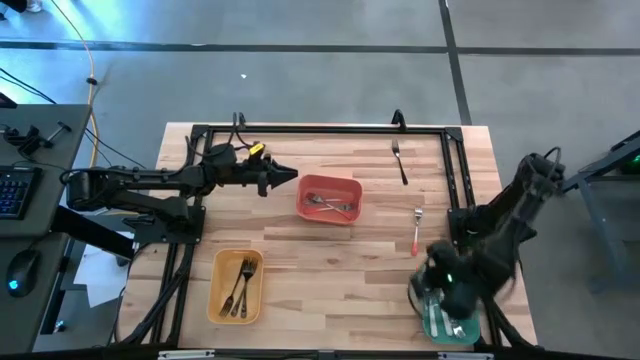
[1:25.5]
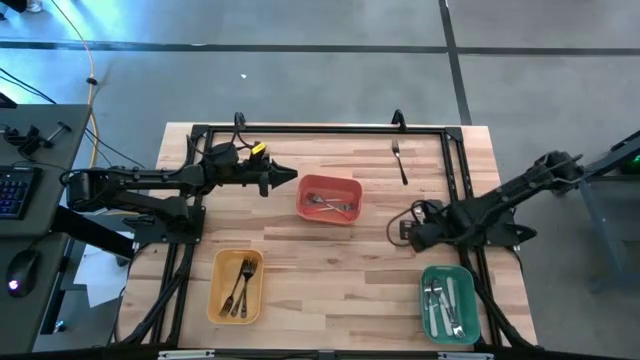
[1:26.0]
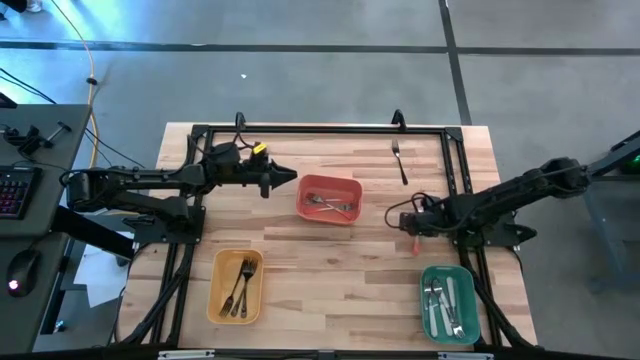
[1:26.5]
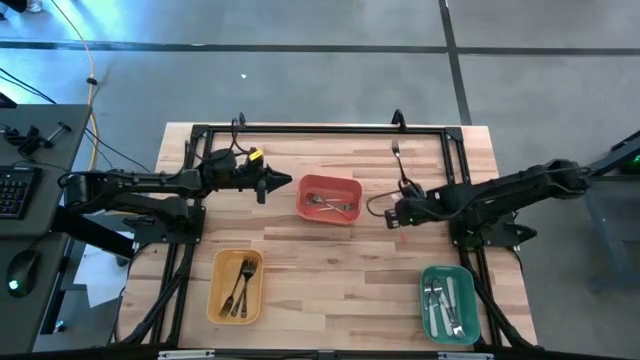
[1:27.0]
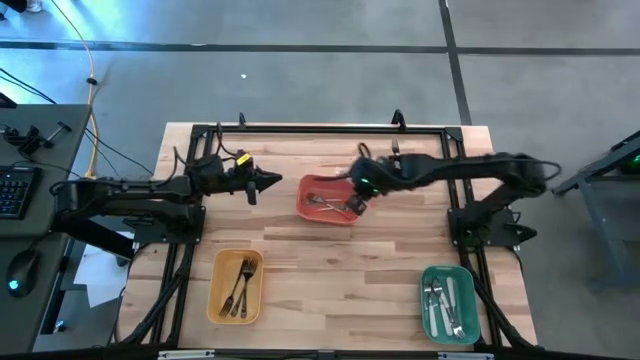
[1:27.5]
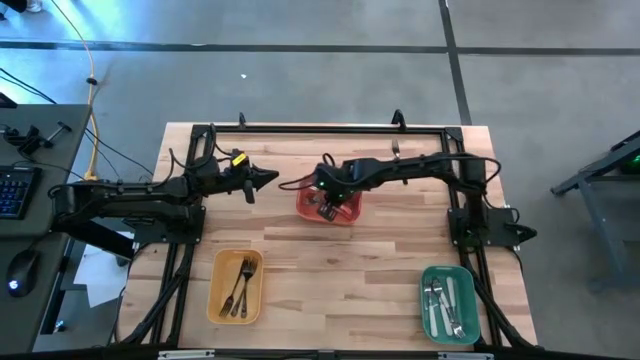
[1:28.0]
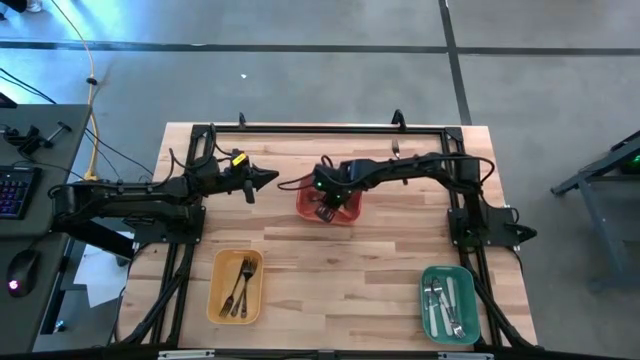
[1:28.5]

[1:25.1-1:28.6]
Task: Sort silverware by color (type)
Put the orange fork into the orange bin

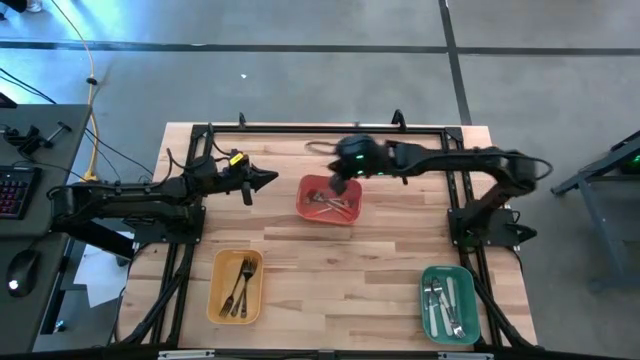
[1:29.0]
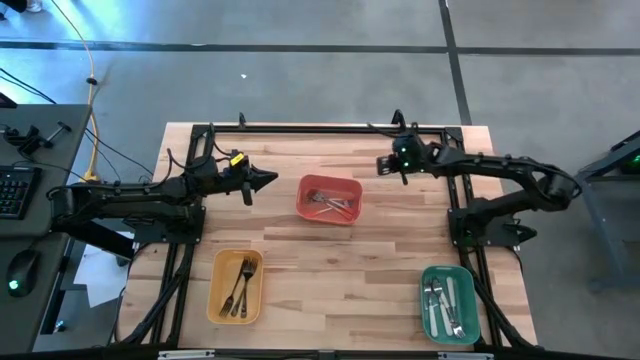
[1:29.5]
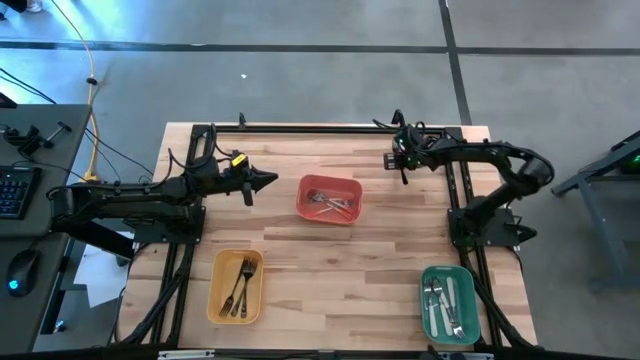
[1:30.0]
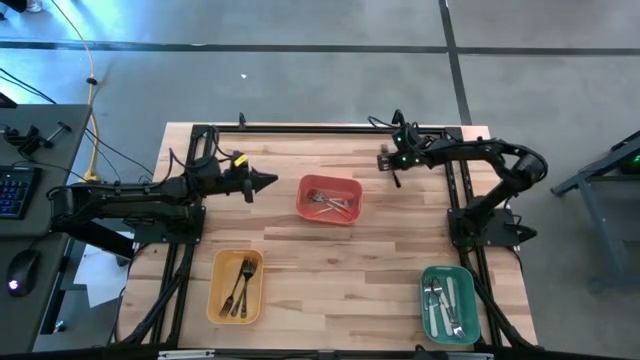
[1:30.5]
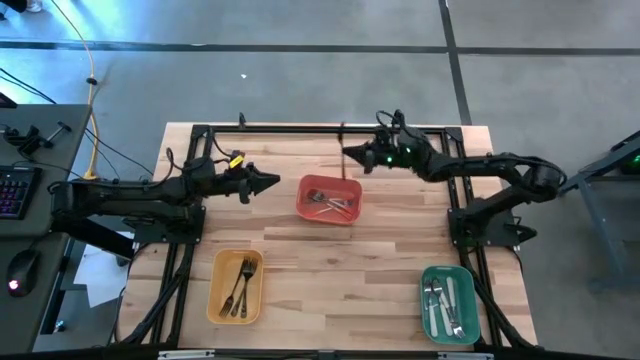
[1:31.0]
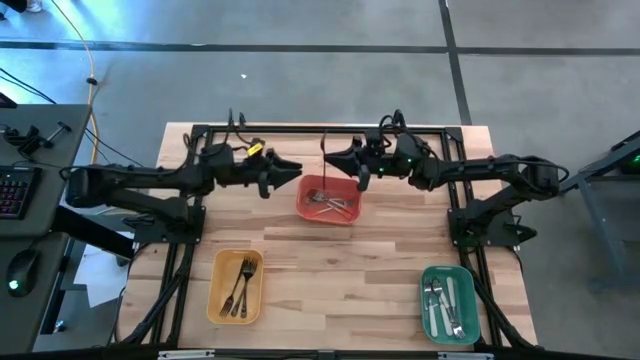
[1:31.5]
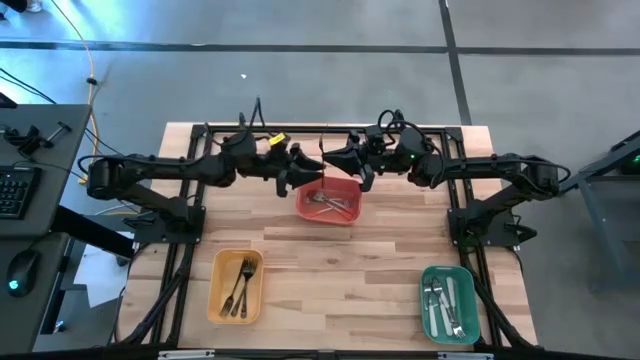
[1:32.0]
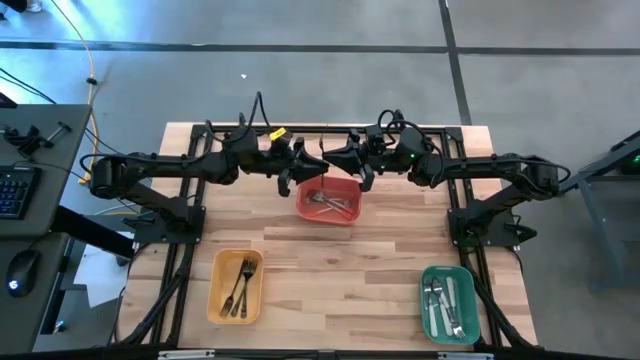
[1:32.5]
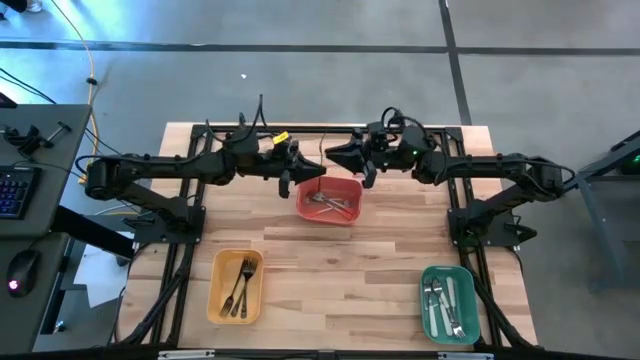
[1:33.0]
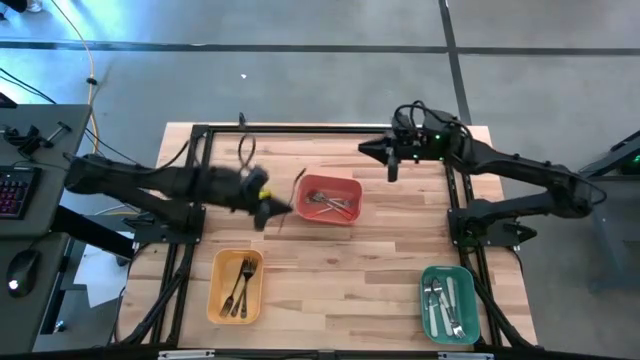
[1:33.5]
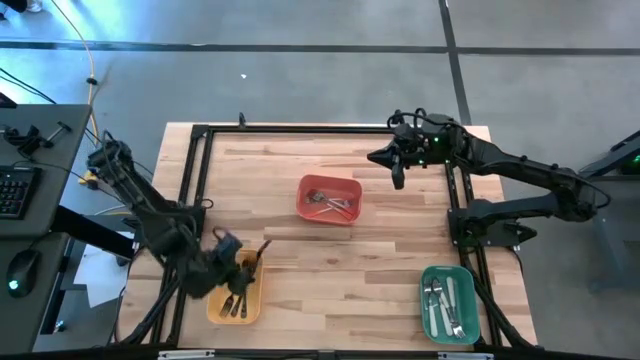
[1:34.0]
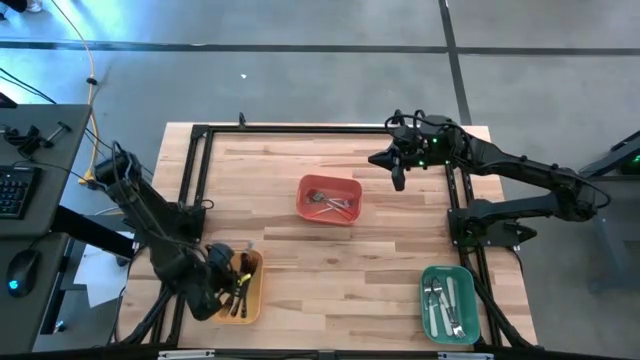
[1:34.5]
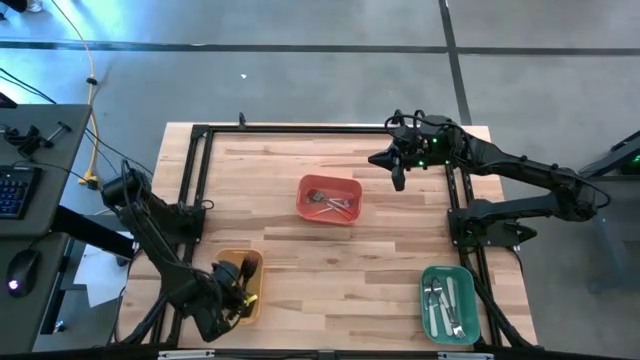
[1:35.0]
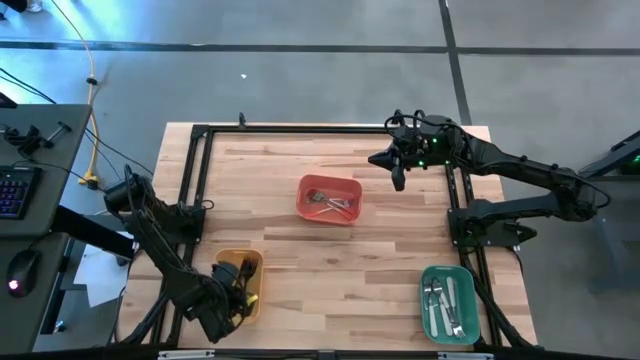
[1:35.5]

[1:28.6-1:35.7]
Put the black fork into the yellow bin

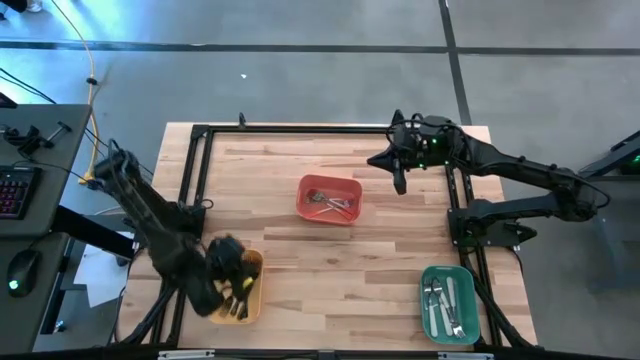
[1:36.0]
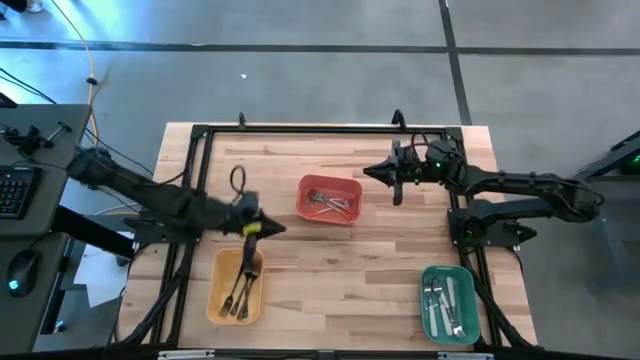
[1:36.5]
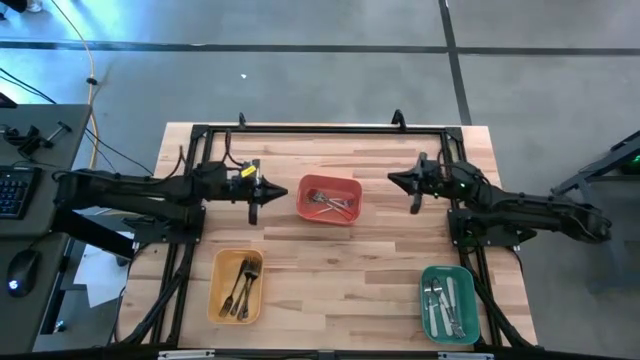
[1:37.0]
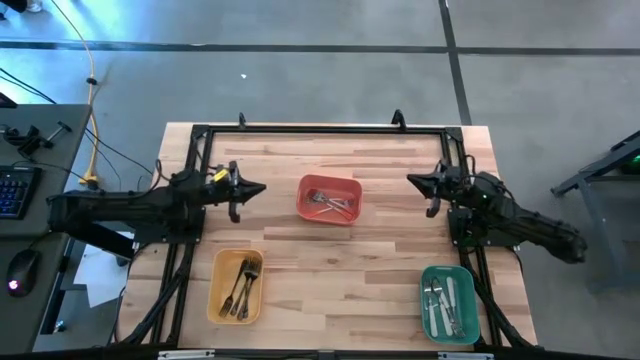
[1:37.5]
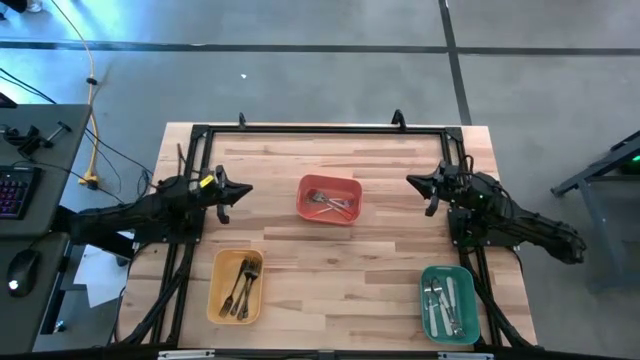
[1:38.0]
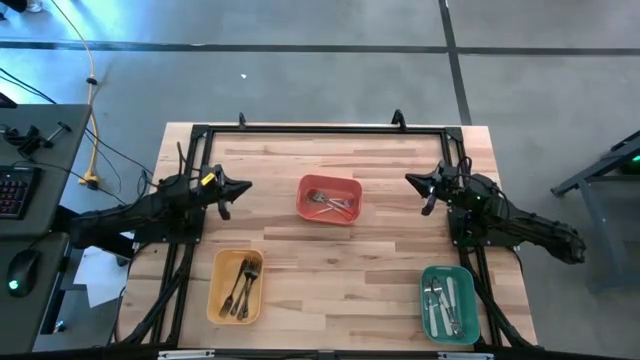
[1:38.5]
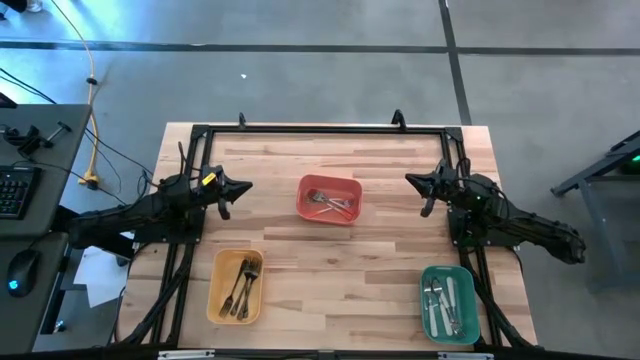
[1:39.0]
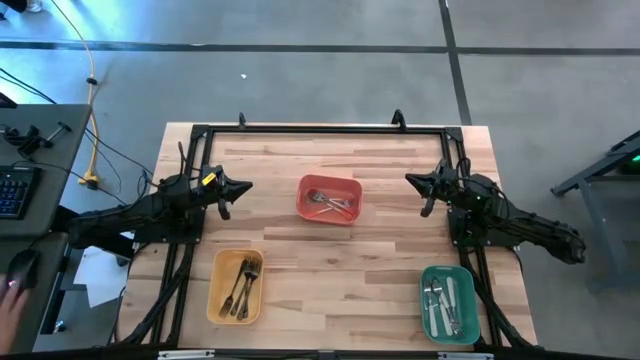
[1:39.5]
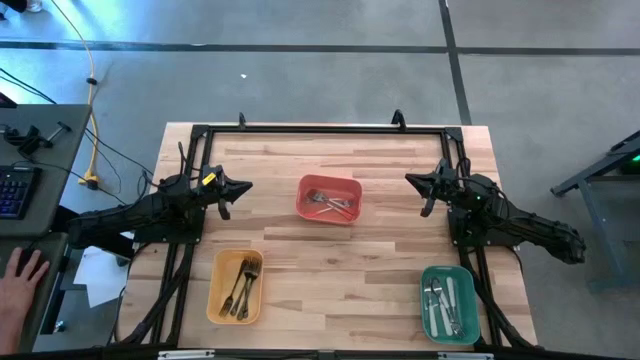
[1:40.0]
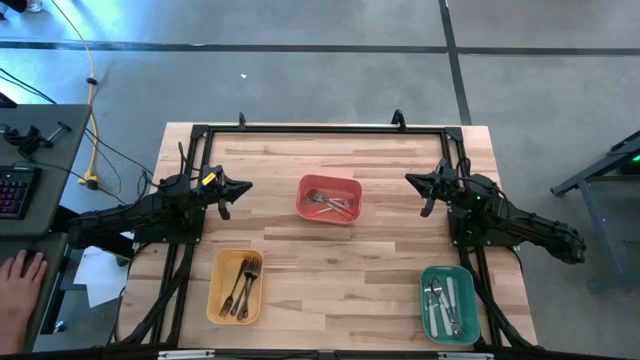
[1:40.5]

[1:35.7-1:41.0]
Return to Home Position

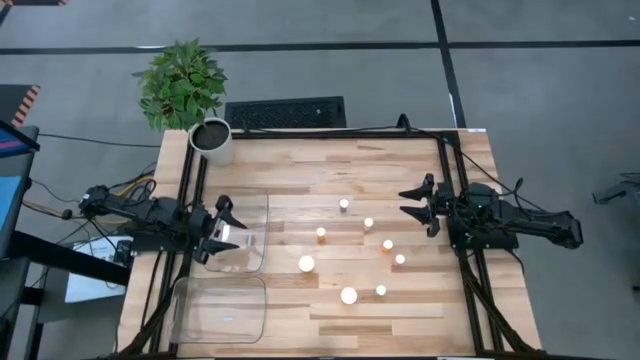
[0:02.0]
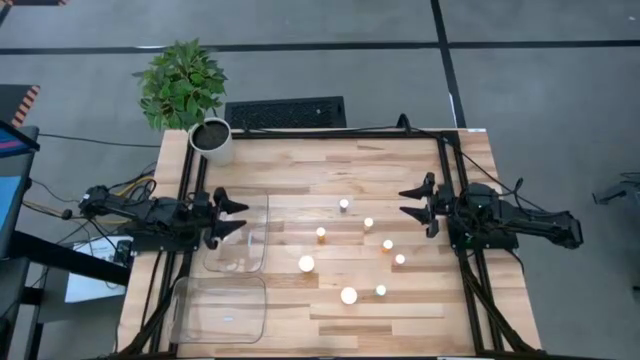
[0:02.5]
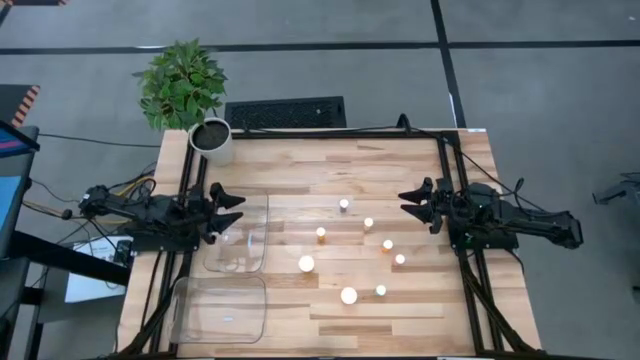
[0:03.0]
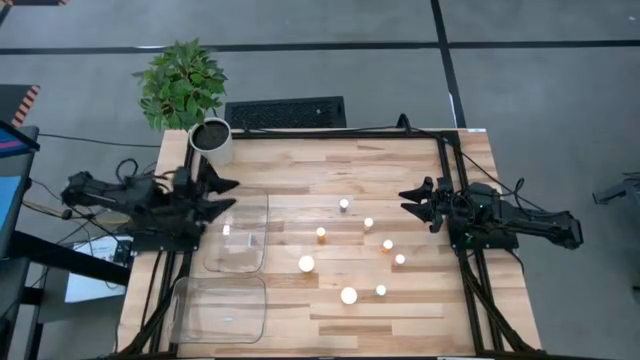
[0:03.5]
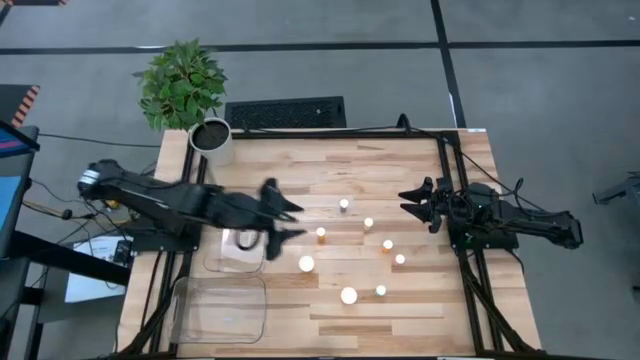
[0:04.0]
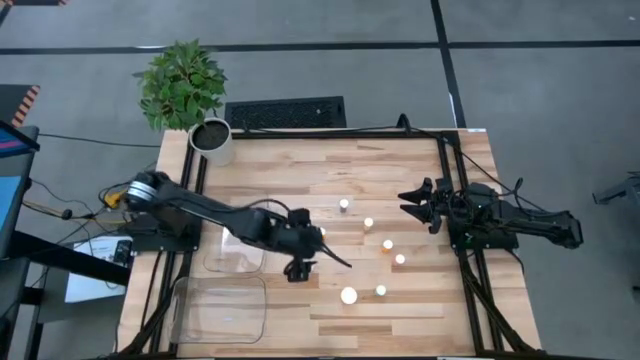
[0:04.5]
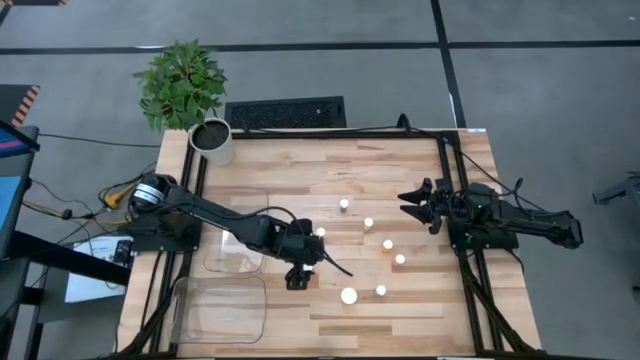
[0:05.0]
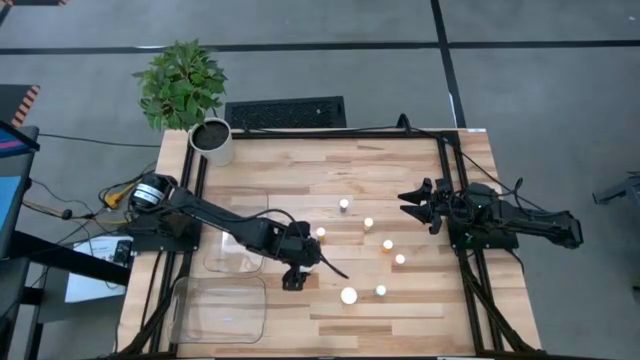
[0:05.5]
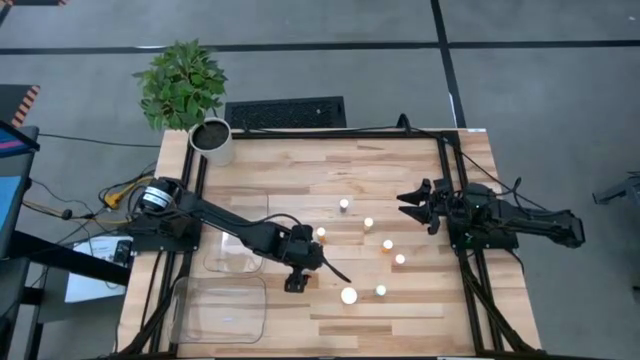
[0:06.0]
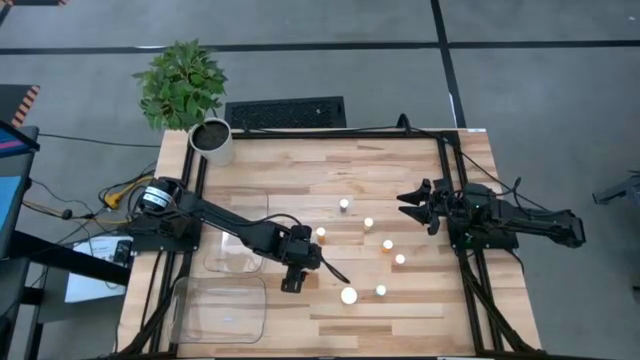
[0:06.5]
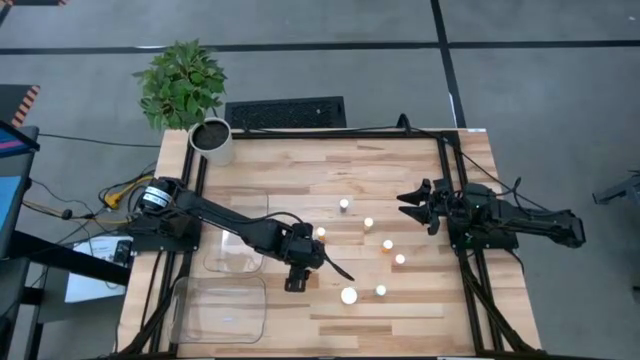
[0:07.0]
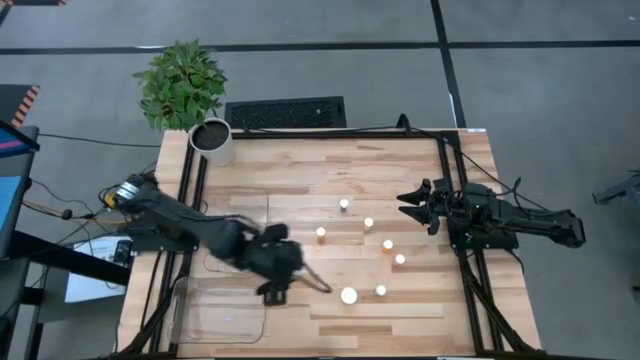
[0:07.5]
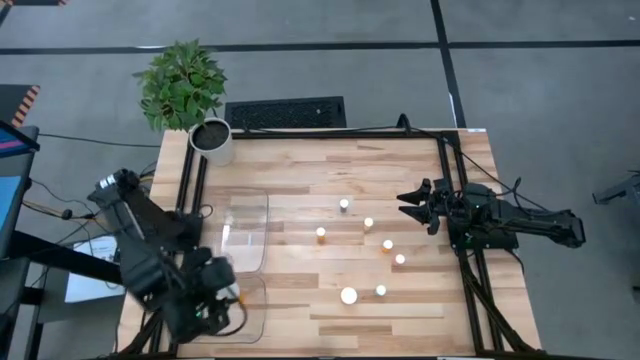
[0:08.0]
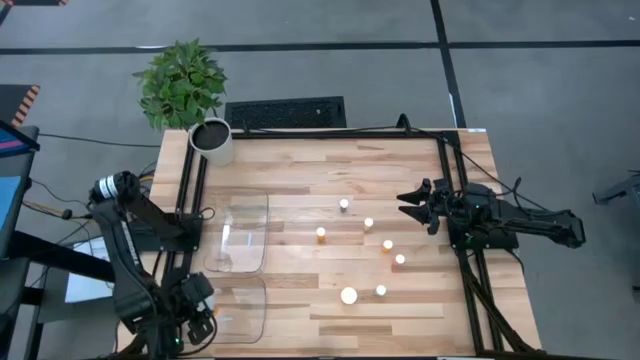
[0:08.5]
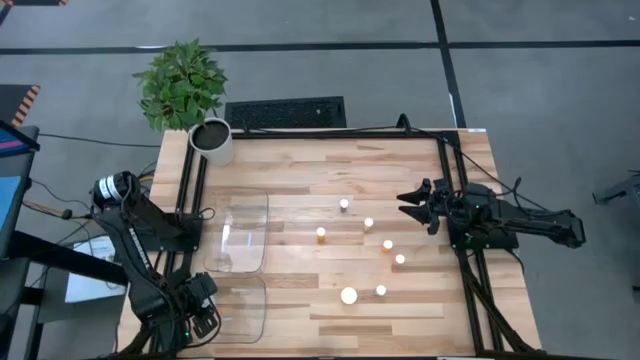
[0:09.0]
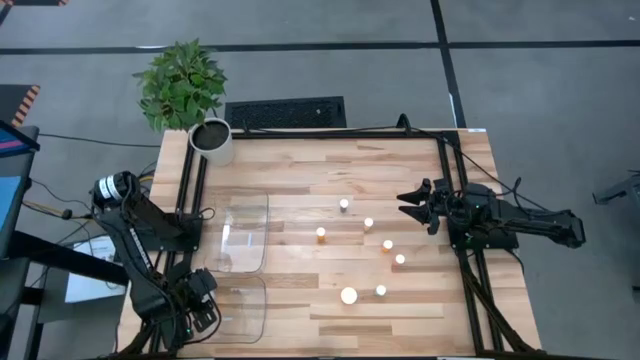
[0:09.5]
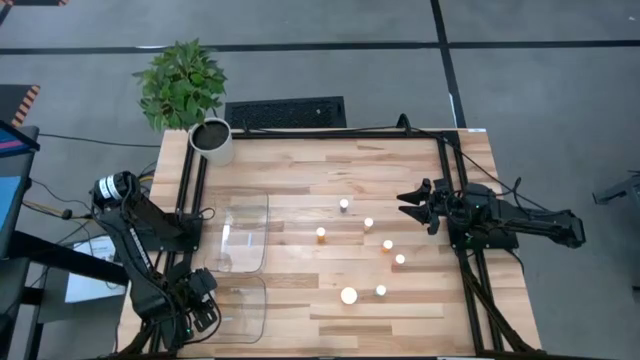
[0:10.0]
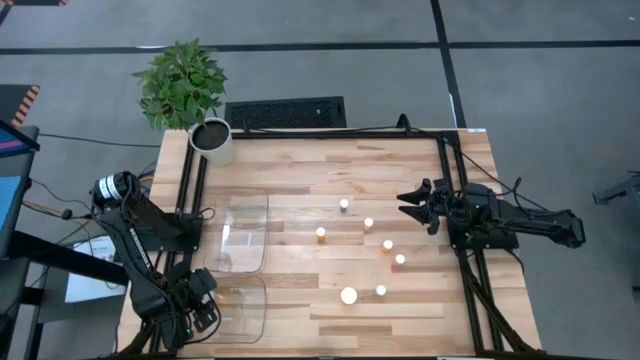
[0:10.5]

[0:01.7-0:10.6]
Task: Pick and place medicine bottles into bin by pill shape (circle, oval)
Put the middle orange capsule bottle into the bottom transparent bin
